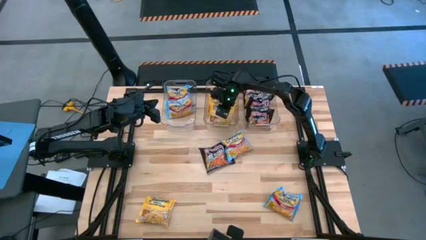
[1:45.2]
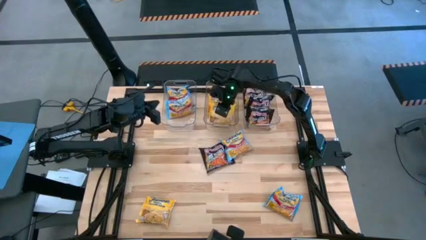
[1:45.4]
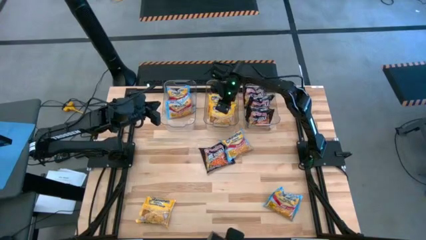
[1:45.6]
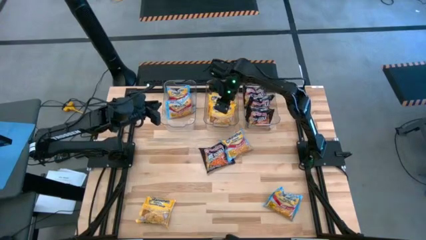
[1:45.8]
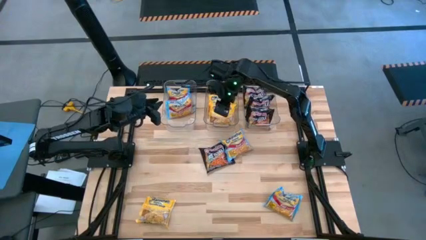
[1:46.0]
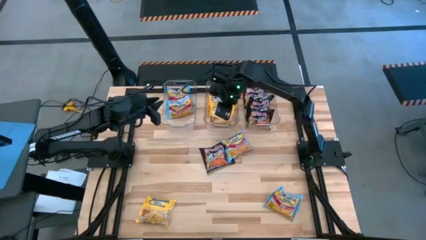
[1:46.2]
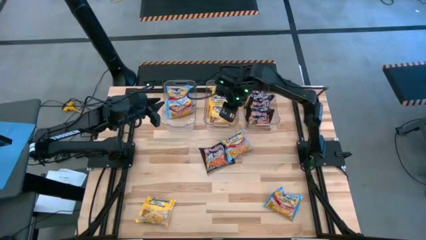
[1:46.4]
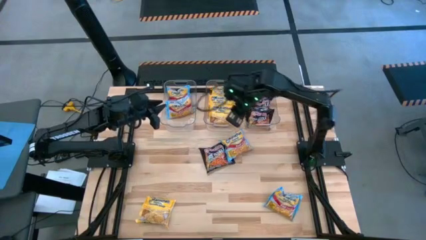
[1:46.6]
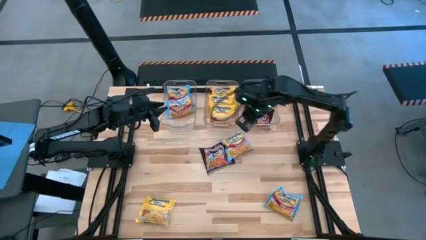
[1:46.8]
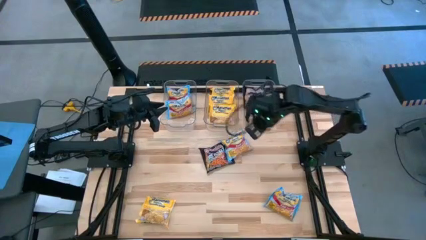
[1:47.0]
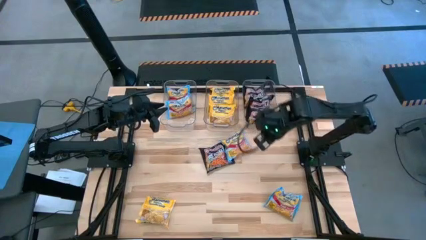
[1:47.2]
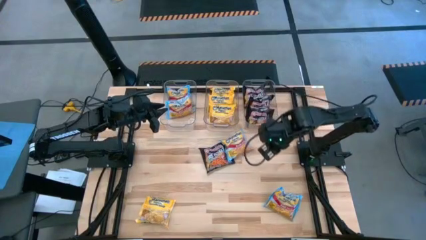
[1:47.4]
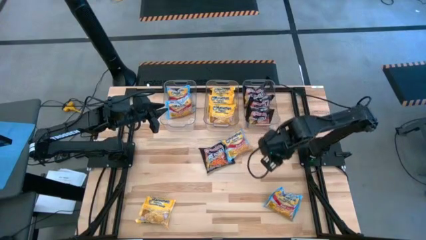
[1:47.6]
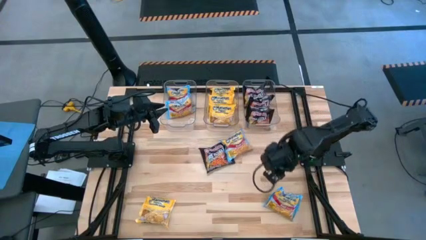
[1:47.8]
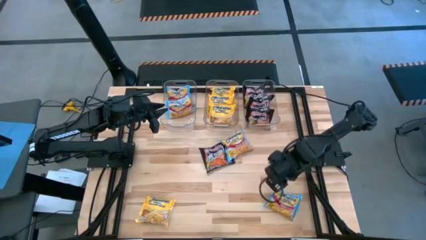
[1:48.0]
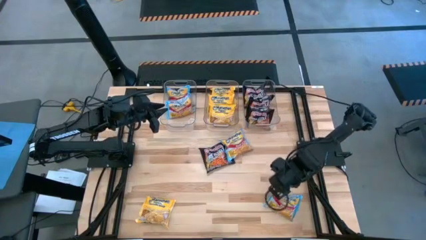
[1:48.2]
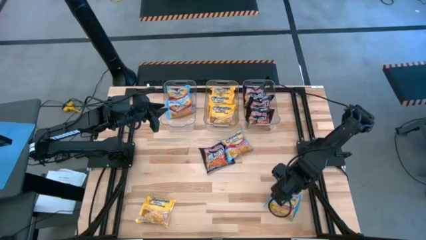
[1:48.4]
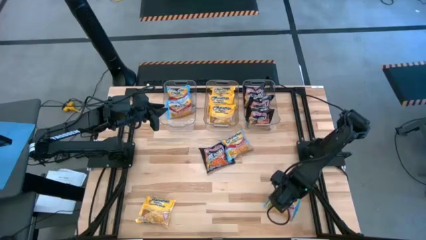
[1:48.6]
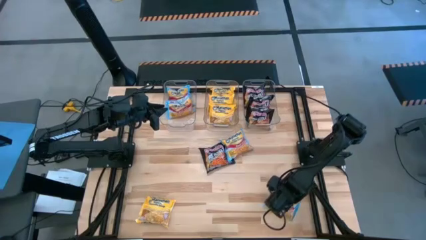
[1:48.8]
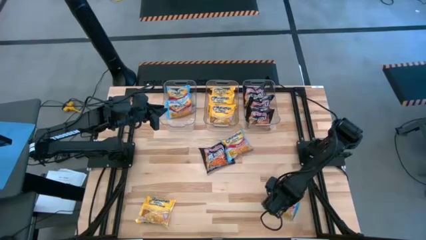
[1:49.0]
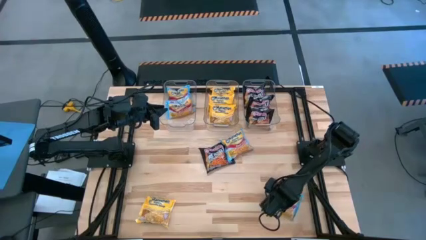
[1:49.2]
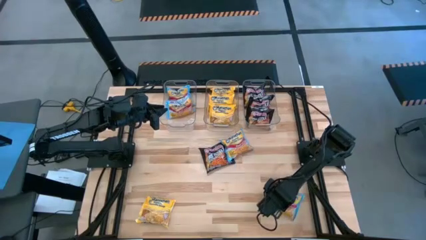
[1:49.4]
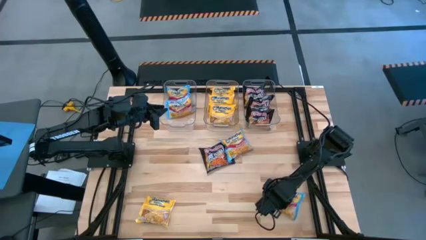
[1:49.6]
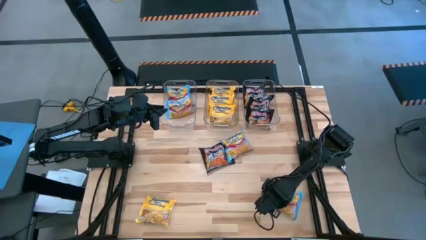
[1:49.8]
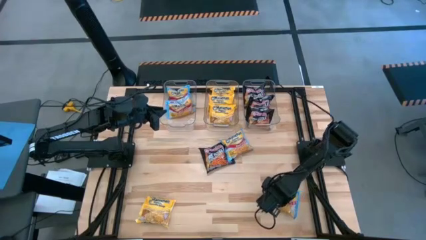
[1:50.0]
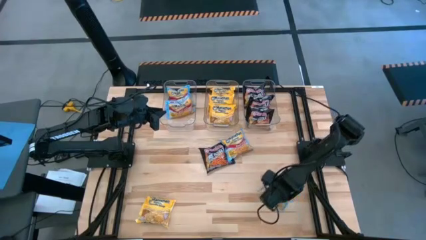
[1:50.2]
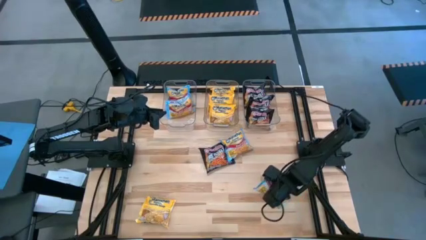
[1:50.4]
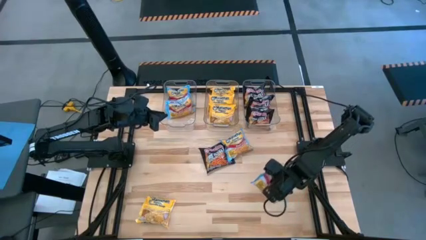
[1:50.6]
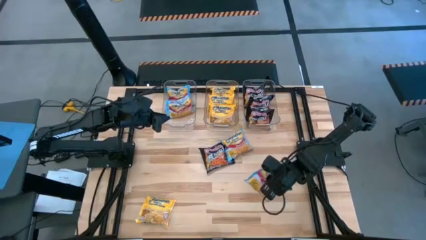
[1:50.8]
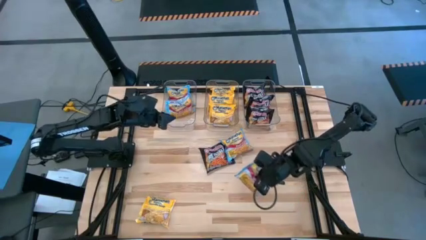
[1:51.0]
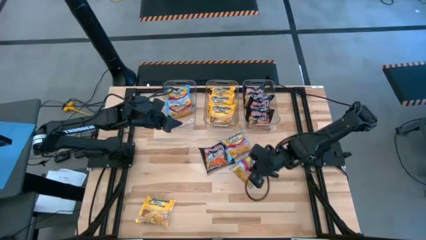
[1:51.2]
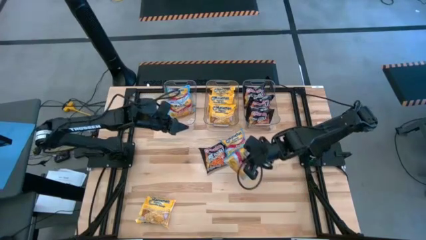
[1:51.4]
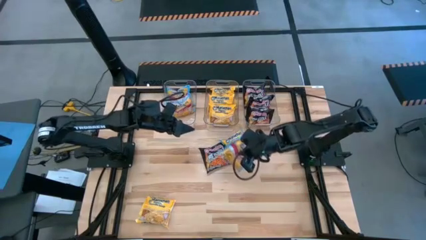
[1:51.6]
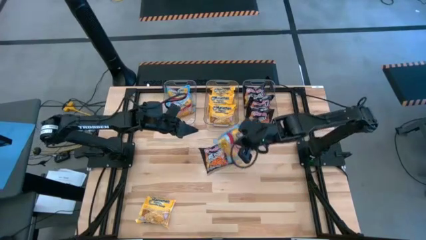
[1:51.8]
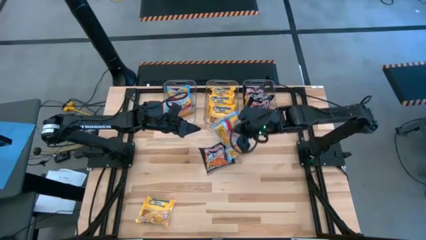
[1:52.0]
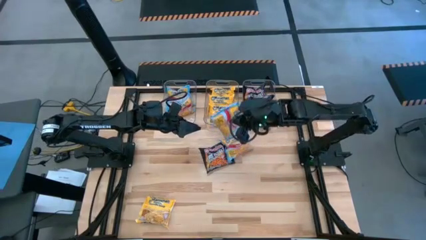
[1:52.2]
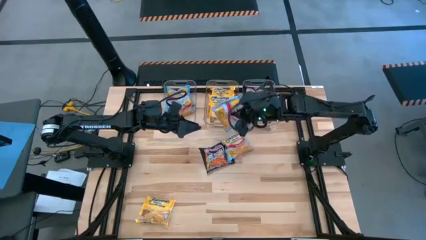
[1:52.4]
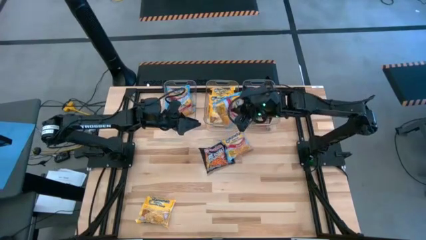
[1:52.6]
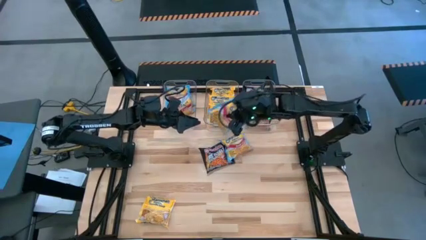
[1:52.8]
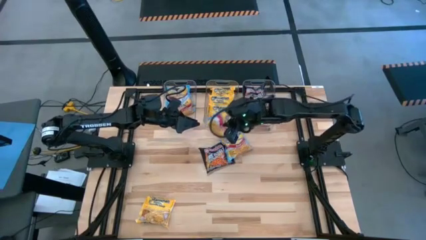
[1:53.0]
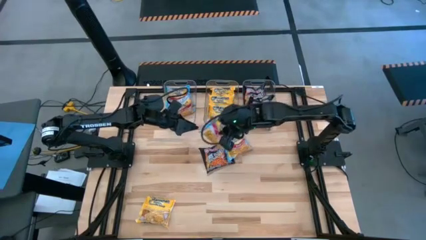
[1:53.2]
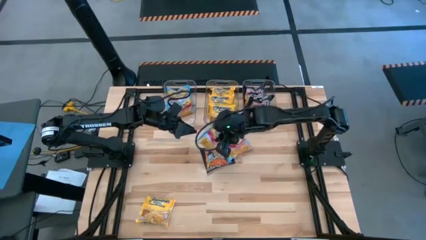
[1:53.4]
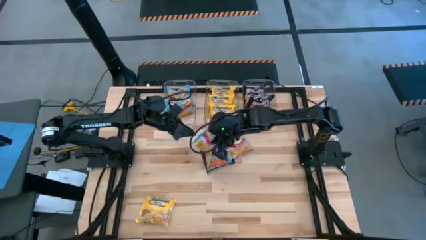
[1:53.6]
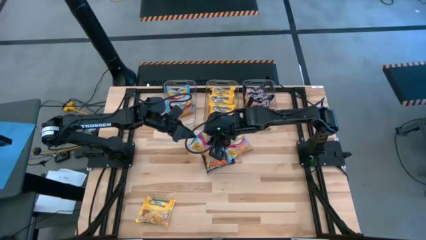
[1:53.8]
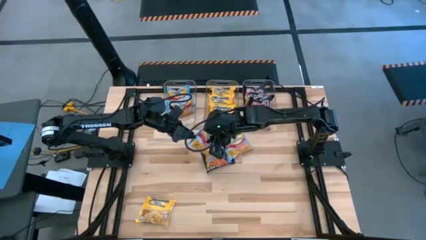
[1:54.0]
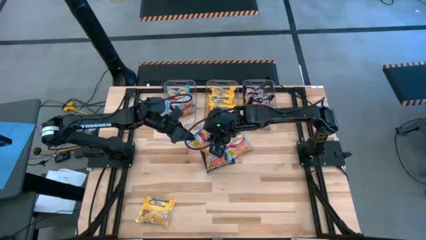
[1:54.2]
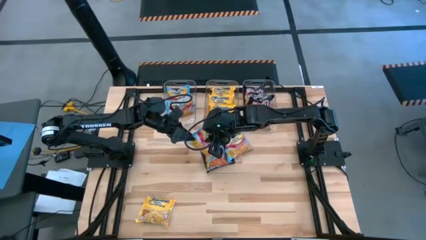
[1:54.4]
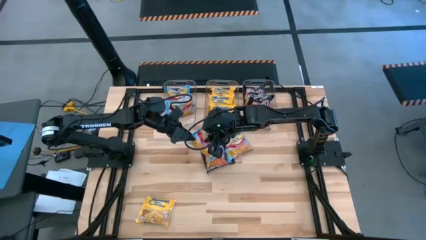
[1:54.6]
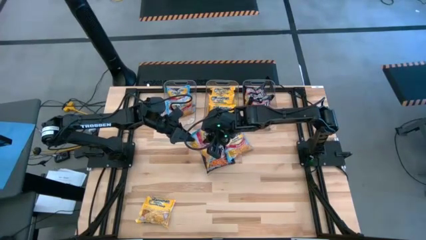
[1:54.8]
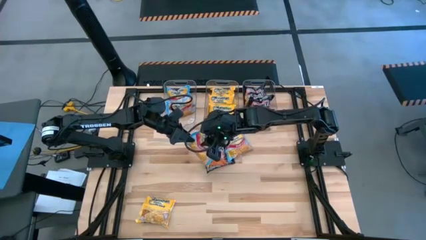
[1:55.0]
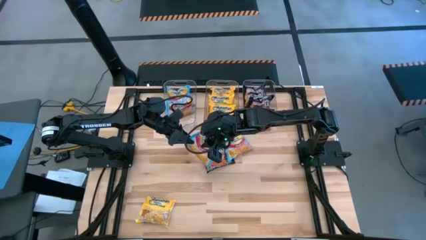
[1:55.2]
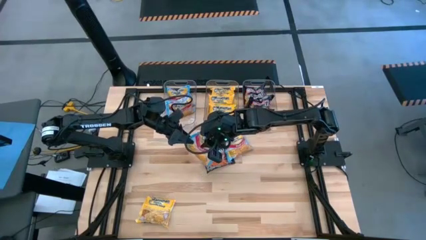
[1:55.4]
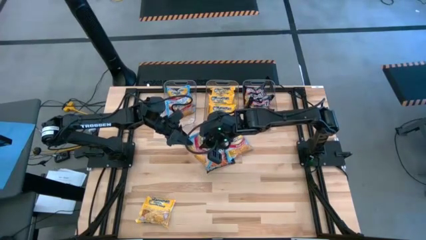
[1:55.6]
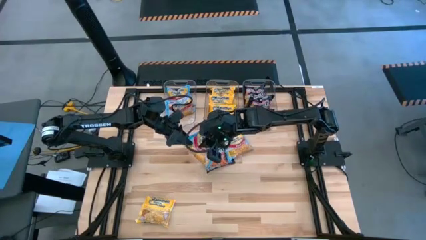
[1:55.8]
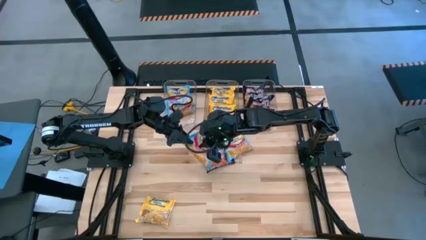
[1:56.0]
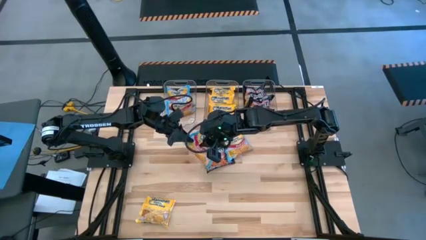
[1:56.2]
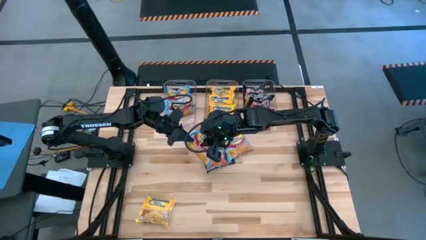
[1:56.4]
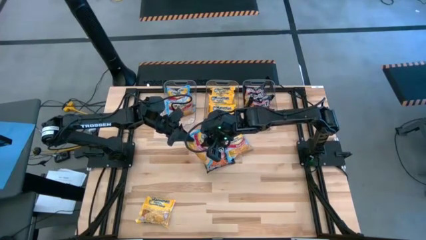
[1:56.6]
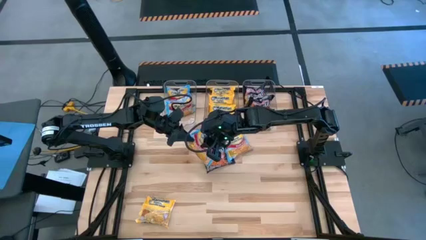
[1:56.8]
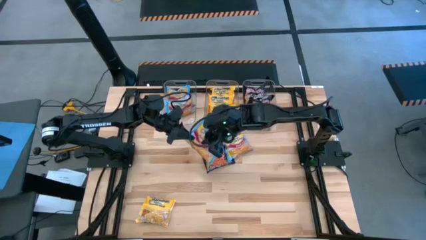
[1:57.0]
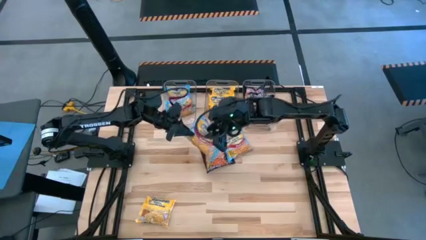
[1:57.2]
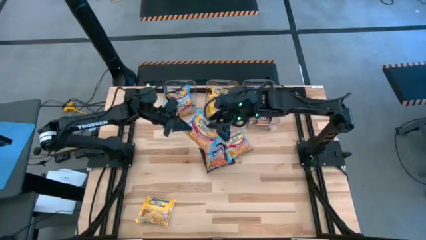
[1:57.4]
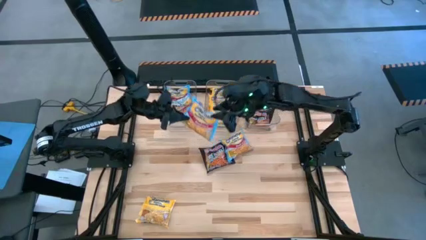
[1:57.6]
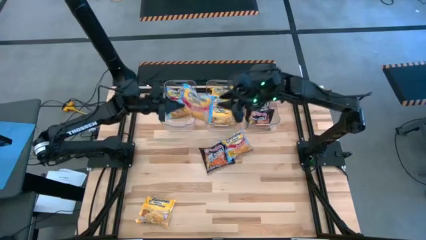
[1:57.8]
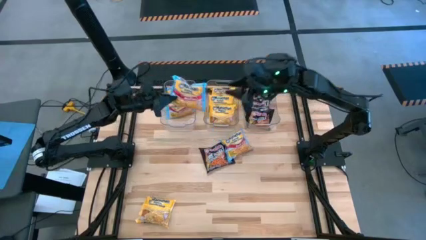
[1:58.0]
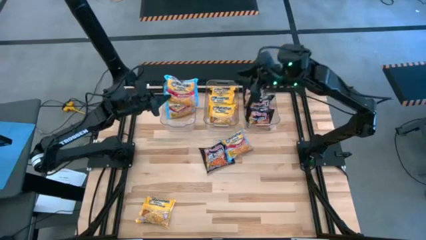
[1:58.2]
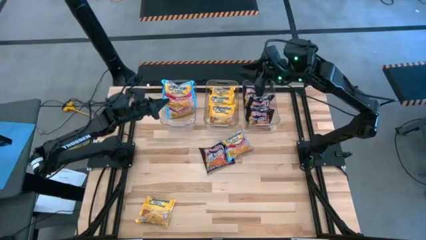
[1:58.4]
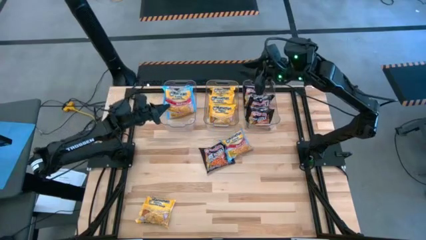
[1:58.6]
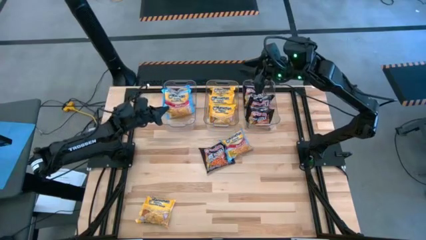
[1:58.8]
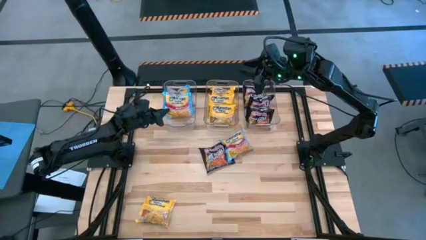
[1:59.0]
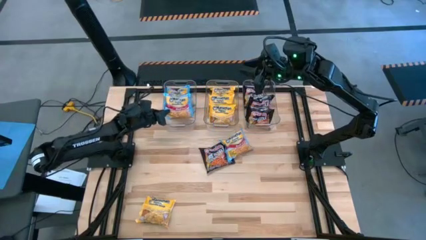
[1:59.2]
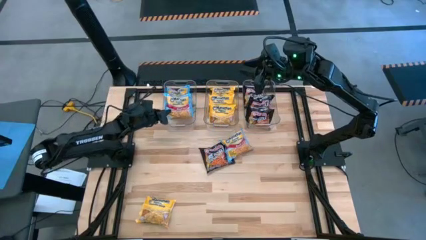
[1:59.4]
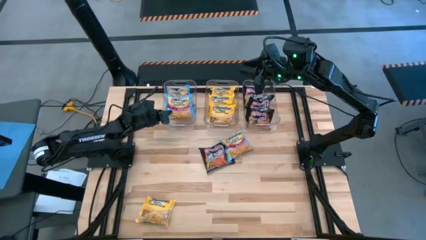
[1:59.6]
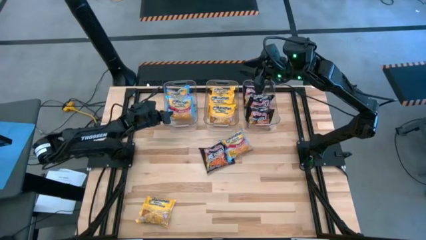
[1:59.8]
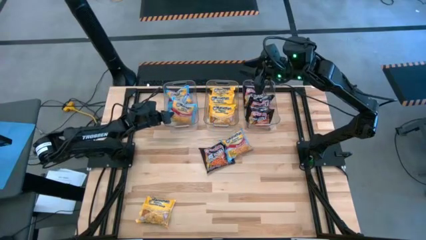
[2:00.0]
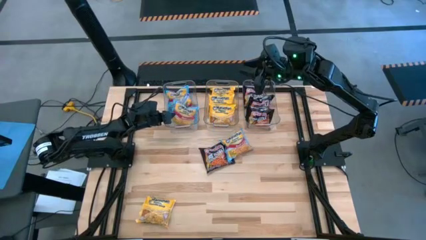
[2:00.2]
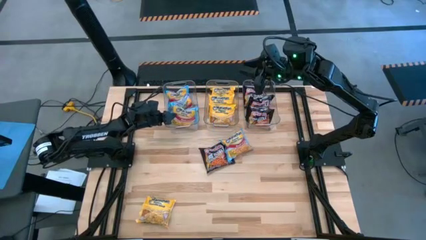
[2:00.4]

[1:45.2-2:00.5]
Task: Sort Maruchan noodles
Put the blue noodle pack into the left transparent bin

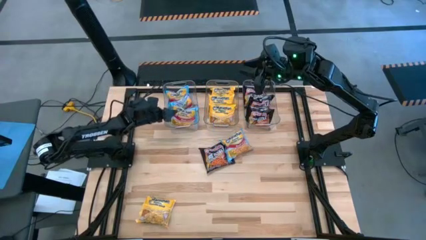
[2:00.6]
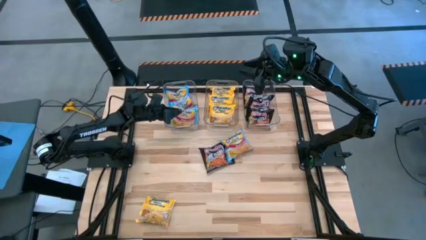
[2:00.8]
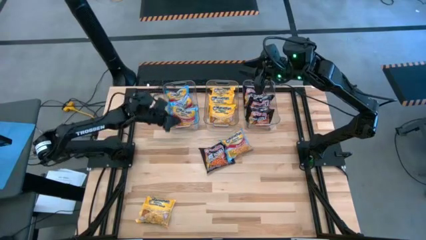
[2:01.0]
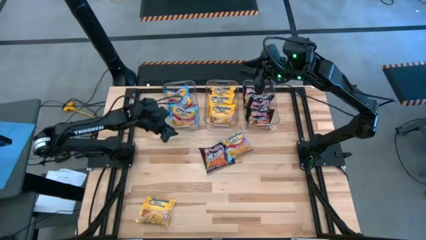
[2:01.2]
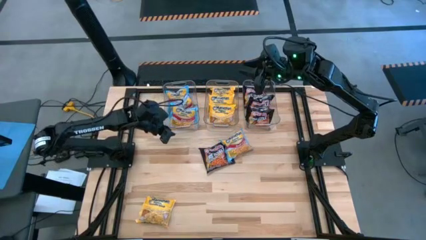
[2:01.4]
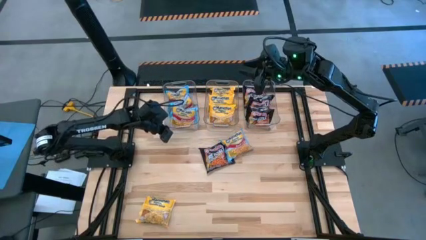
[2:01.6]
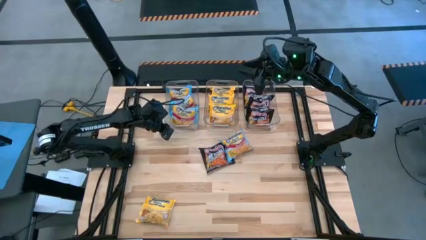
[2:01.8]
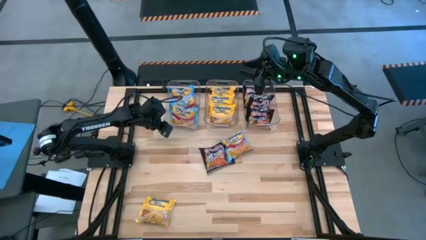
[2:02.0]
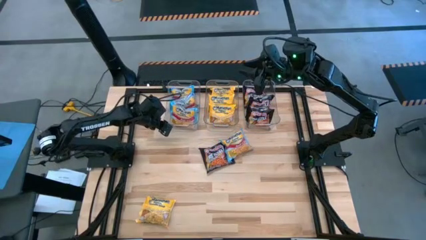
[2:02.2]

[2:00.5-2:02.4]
Adjust the left transparent bin
